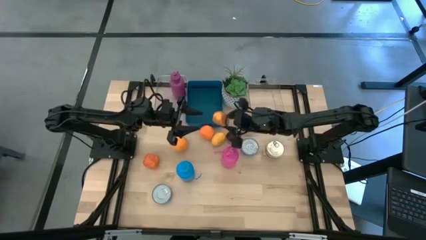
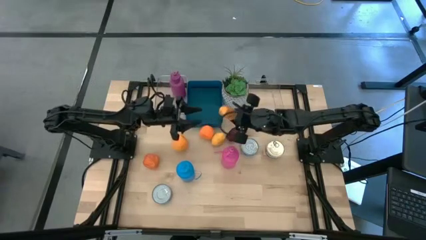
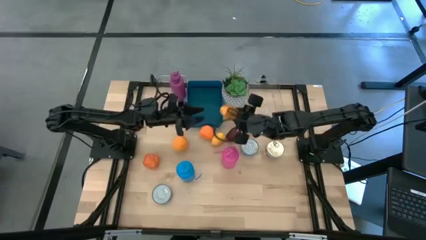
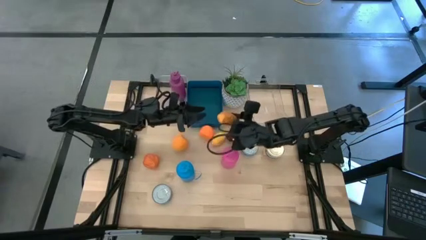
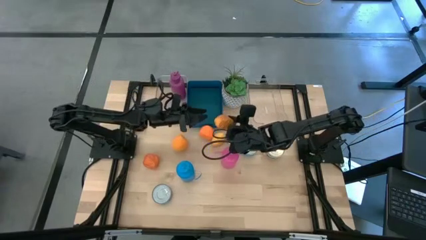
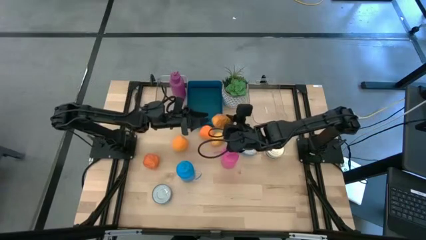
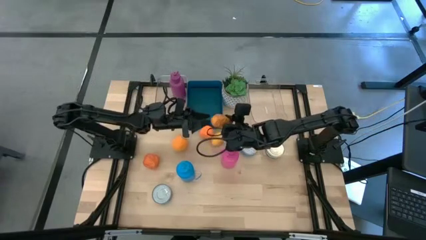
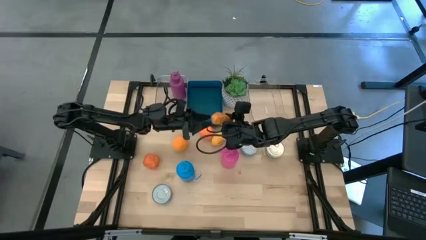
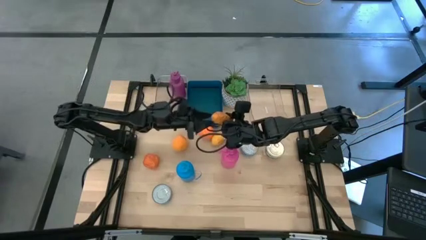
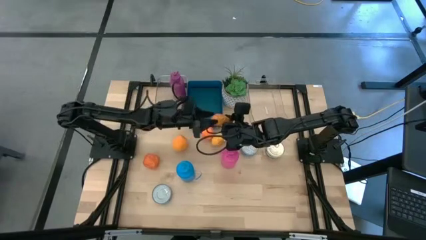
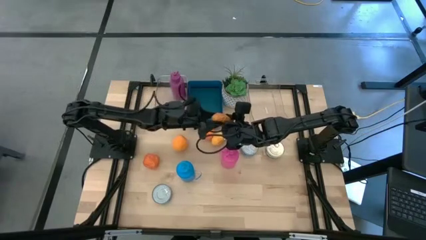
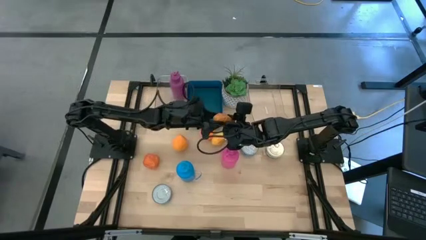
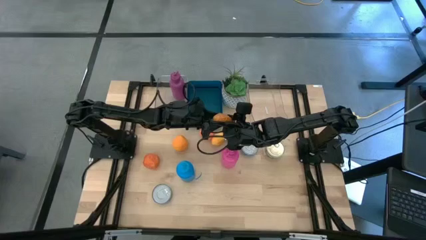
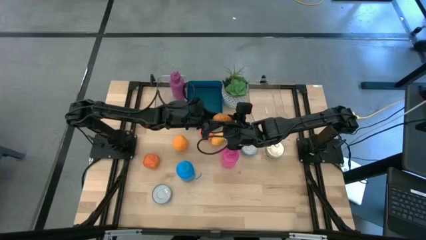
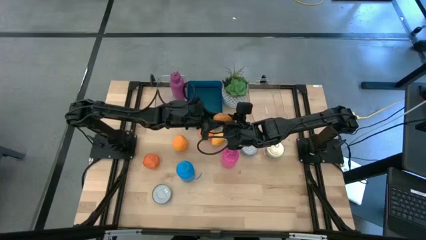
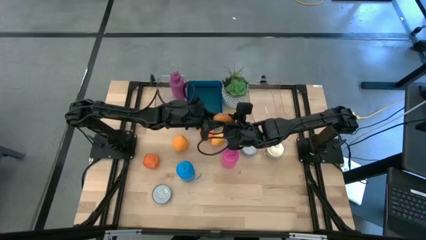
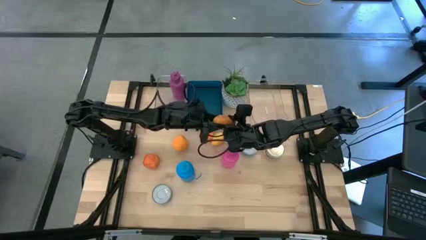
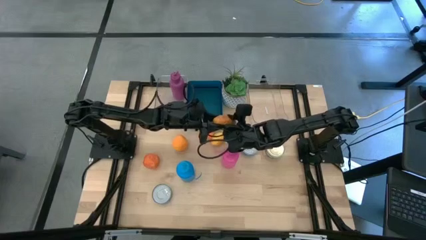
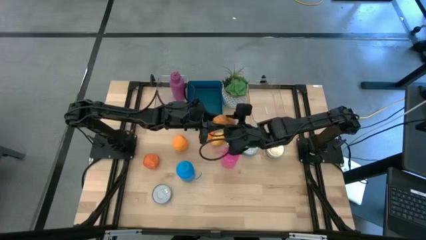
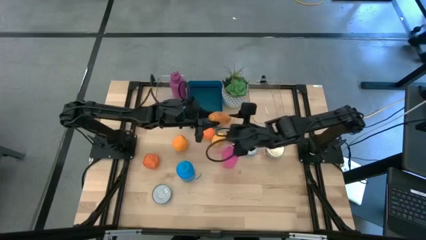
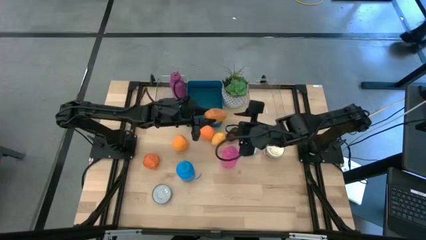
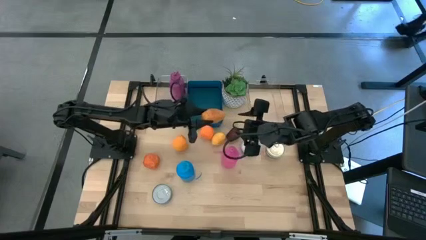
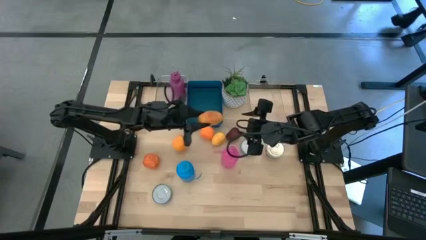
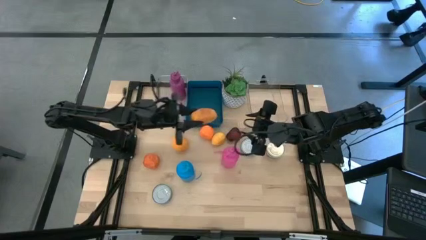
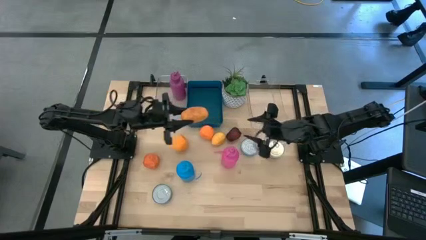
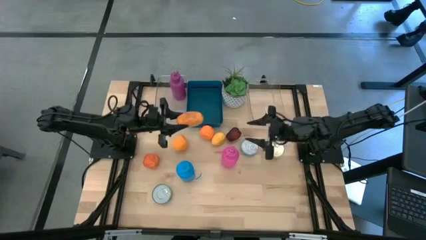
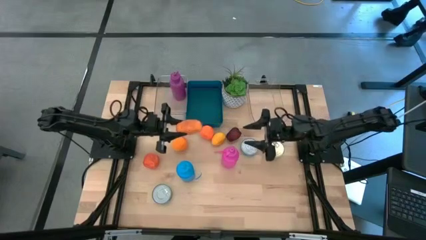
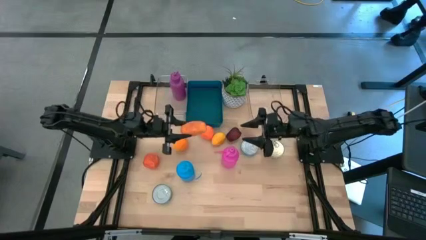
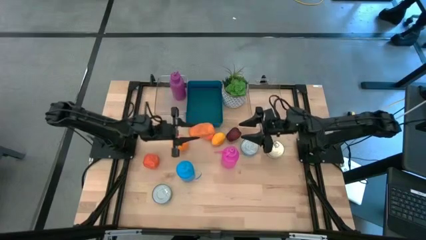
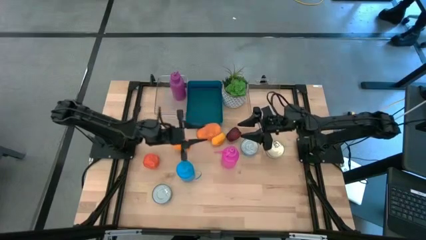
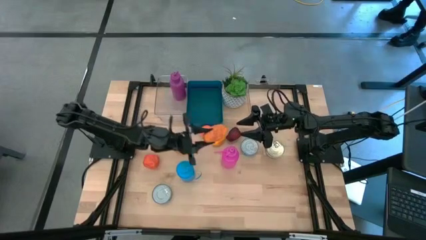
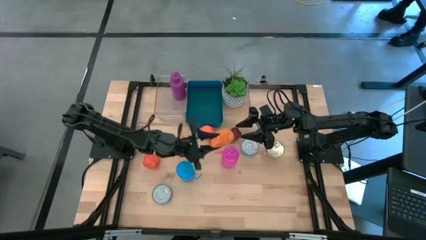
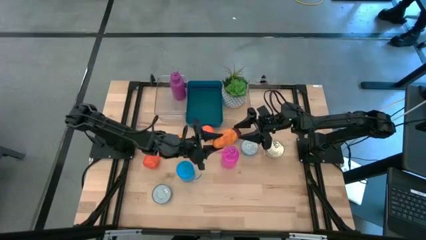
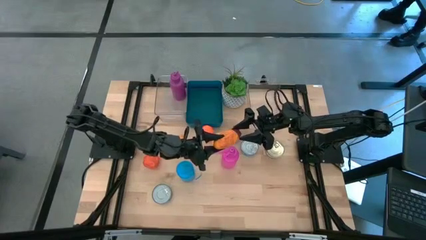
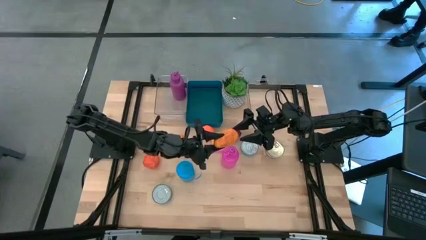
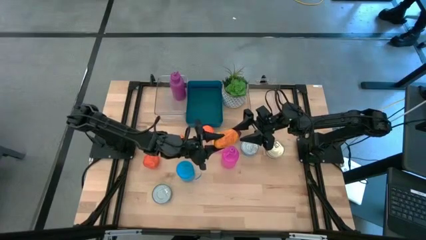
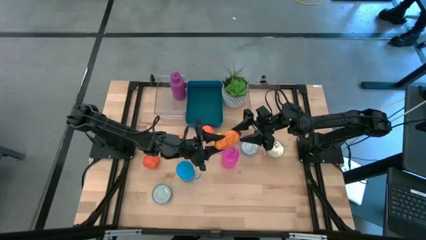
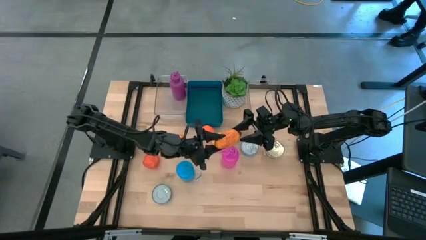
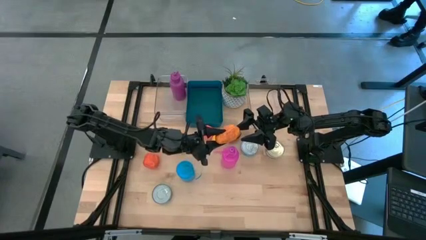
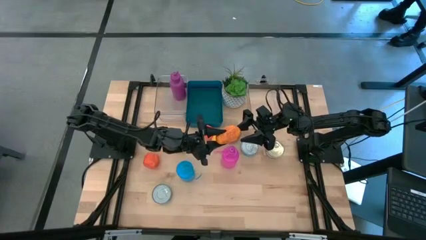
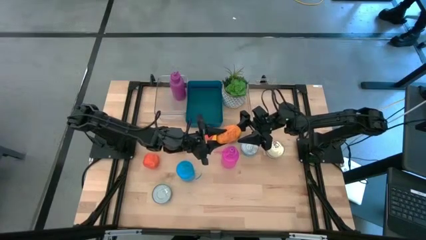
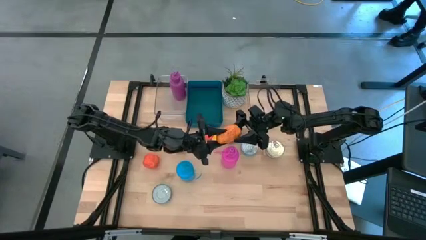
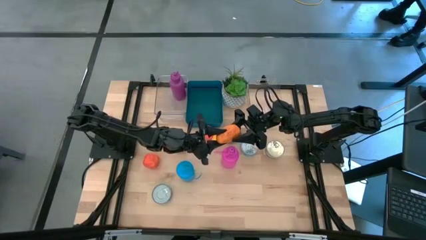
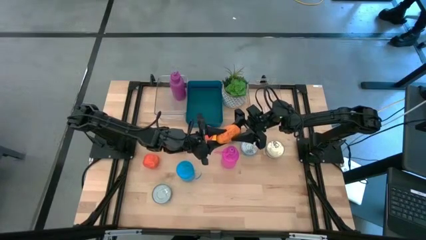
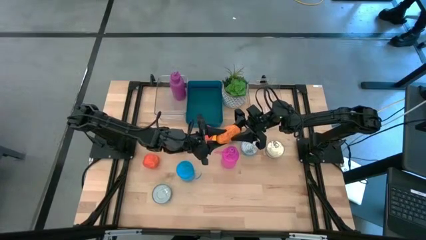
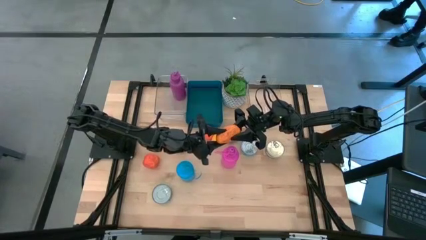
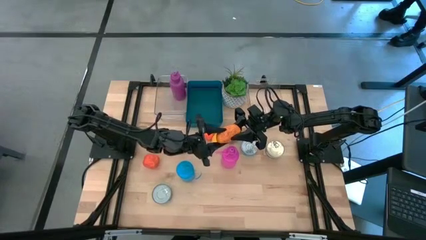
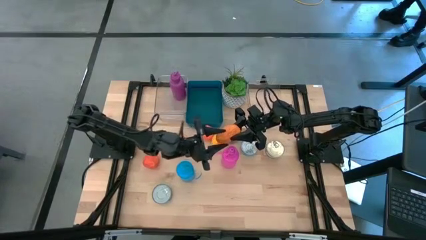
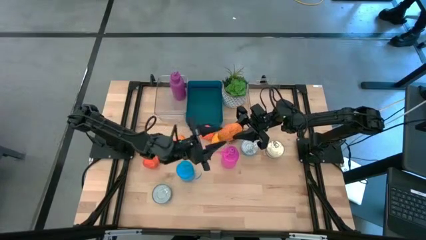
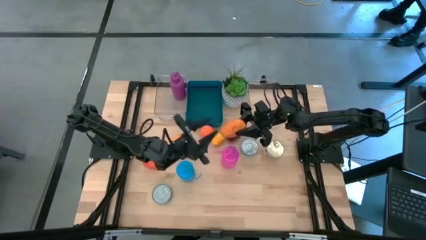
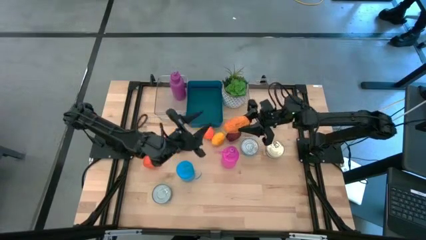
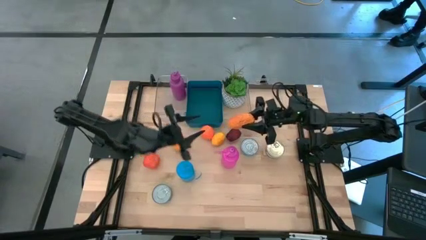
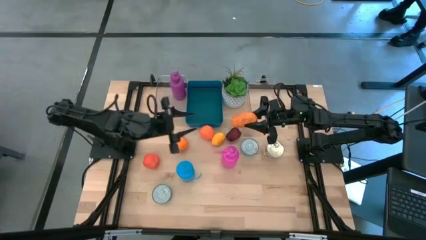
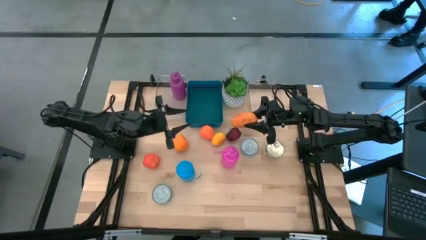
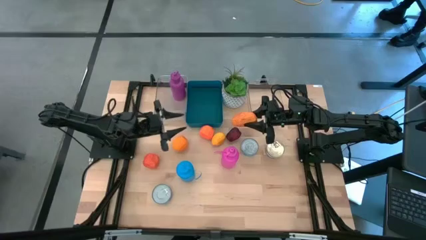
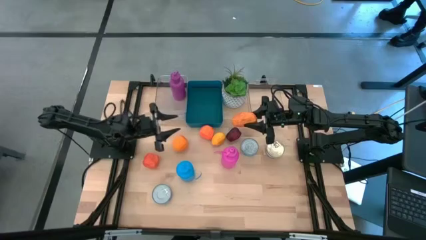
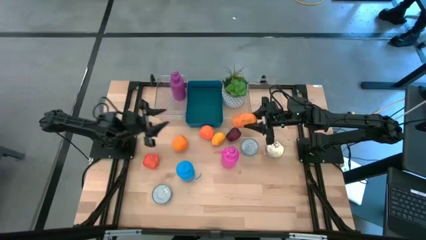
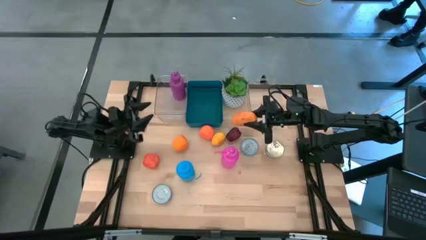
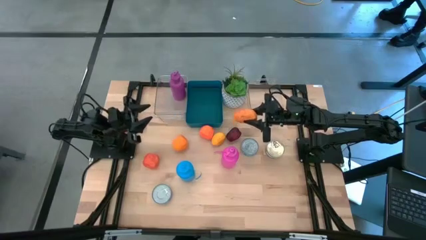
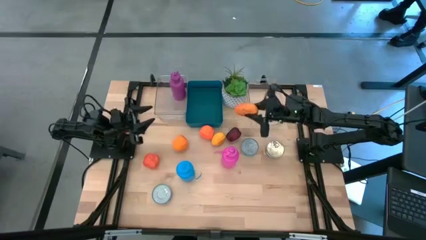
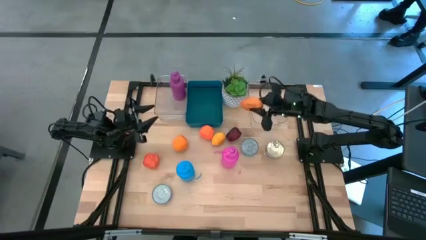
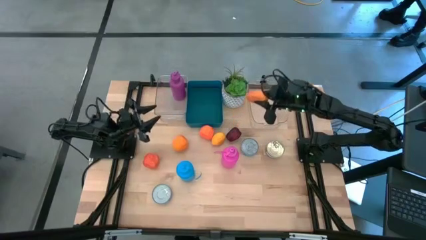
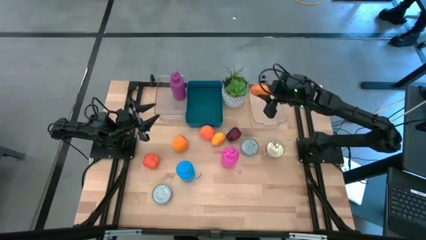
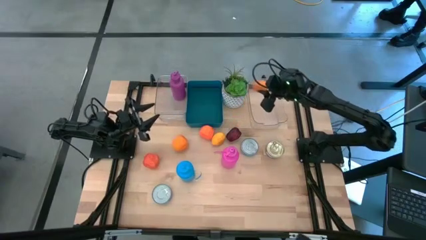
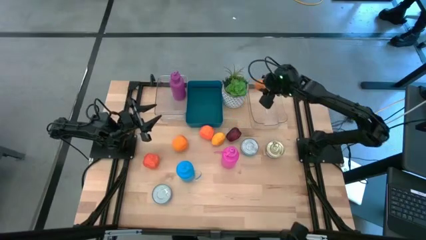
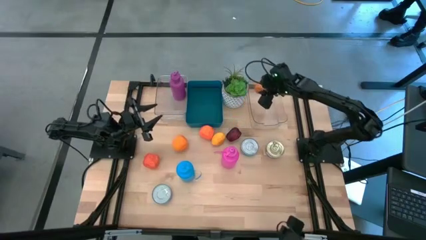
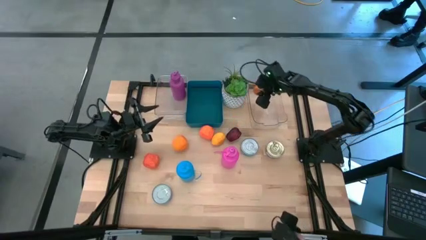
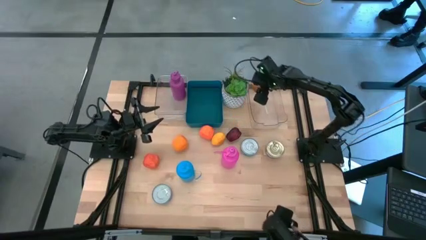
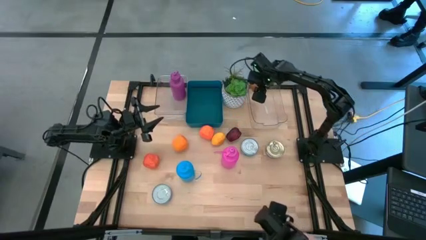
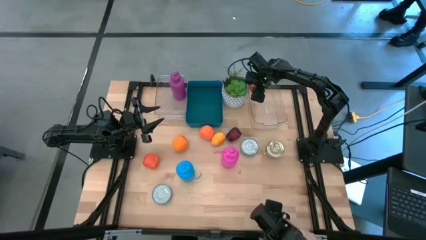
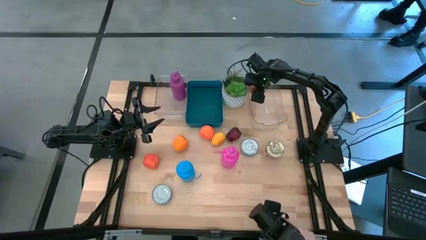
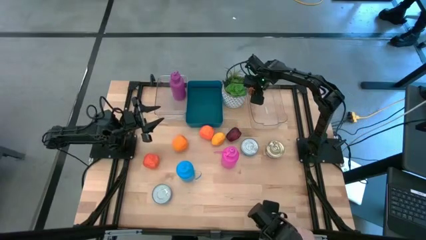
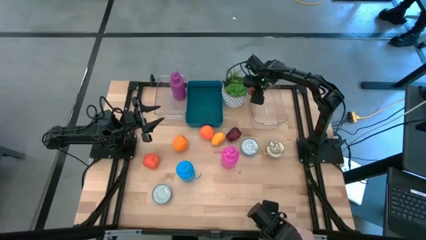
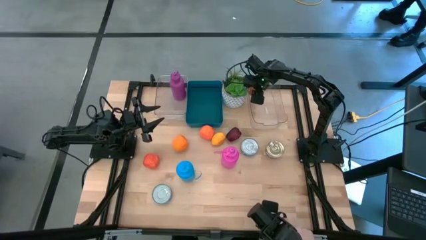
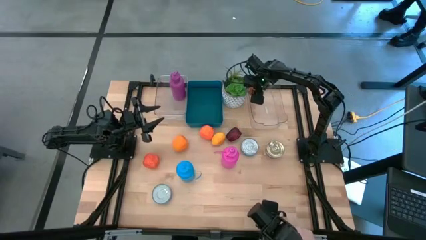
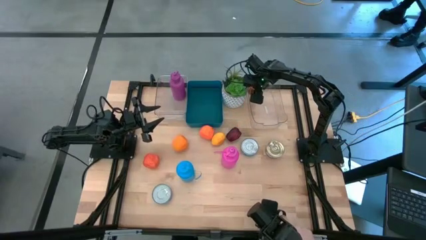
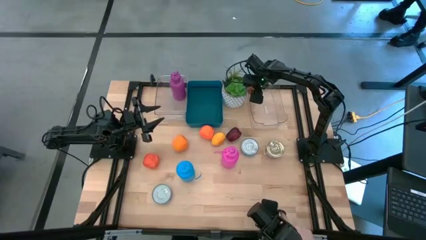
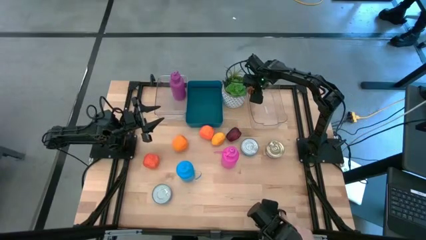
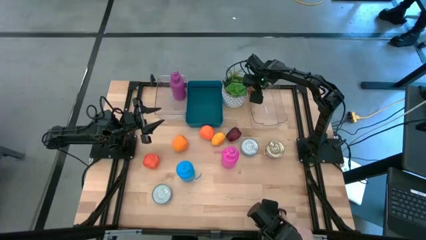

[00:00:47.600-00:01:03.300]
Task: Pick & Place Food Item
Put the left mango into the right transparent bin

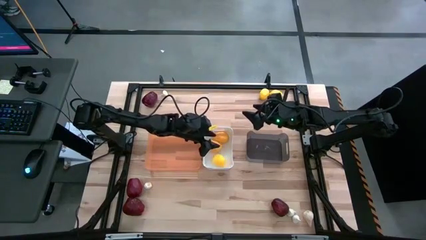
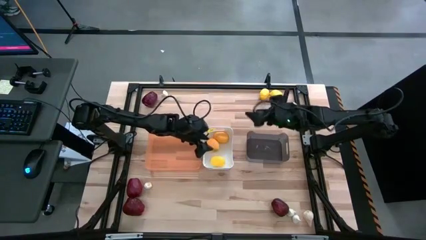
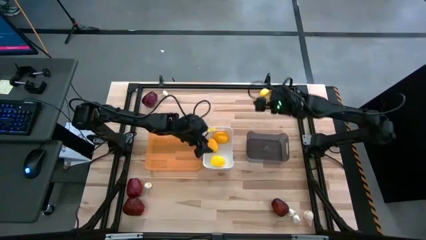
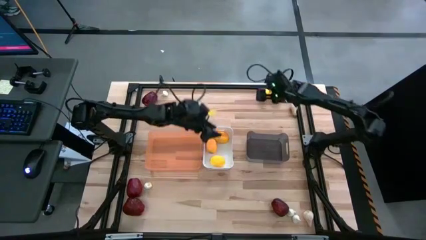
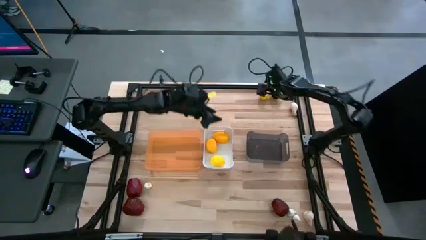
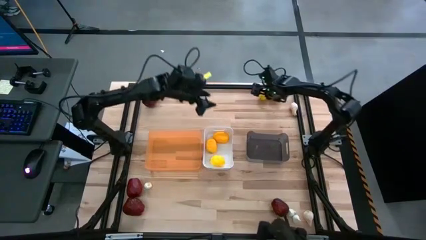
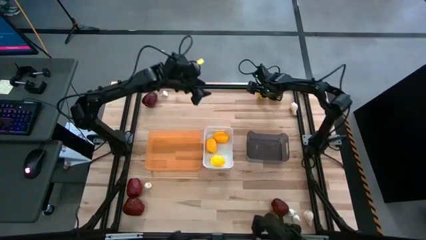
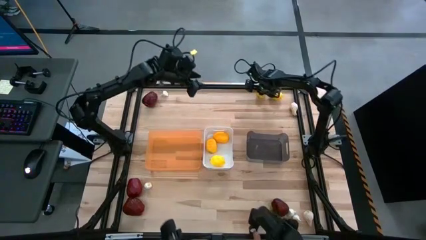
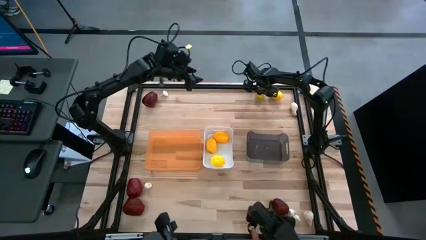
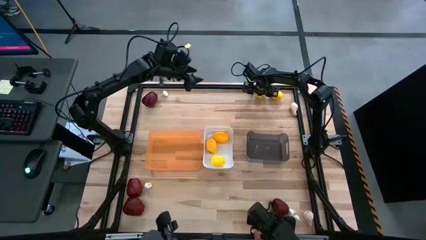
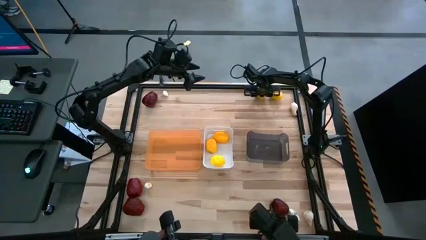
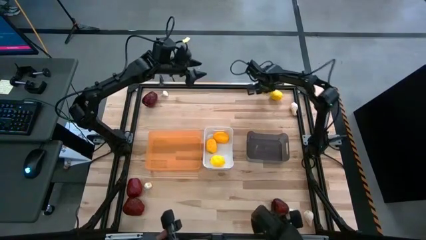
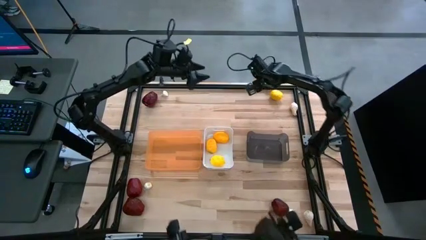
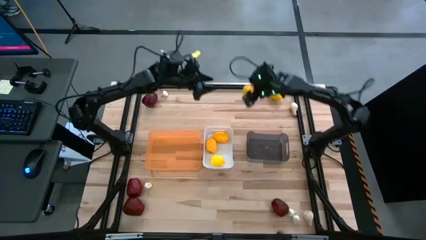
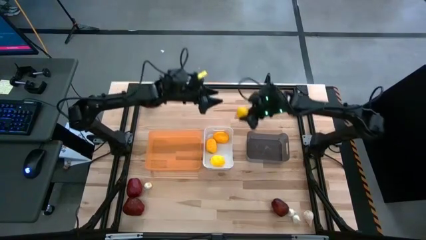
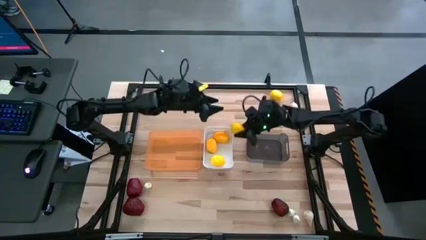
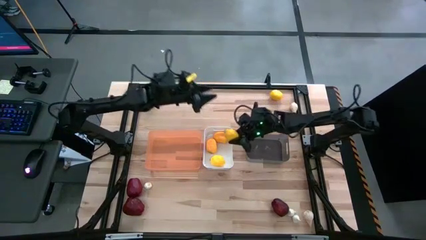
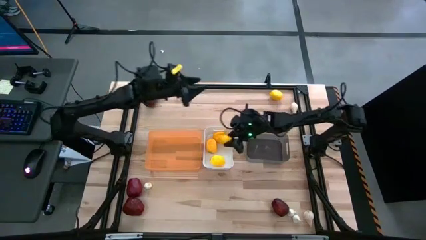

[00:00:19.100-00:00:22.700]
Task: Sort produce into baskets
Put the yellow lemon into the white bin
